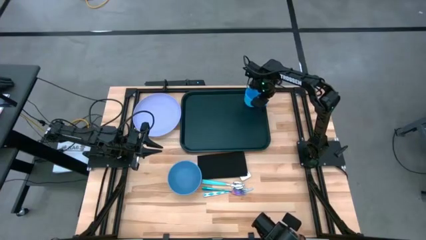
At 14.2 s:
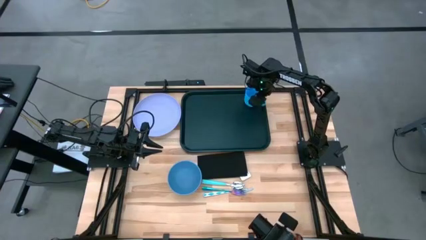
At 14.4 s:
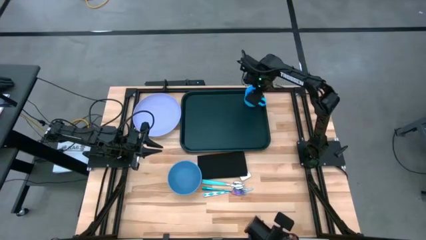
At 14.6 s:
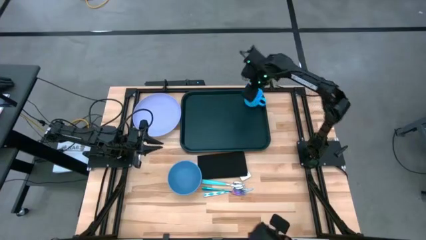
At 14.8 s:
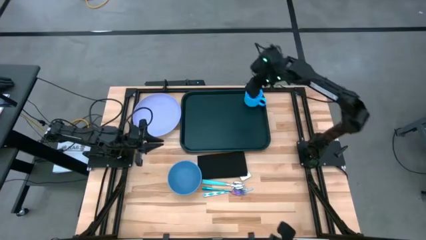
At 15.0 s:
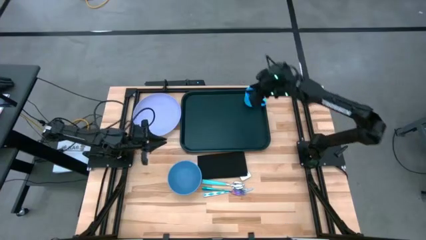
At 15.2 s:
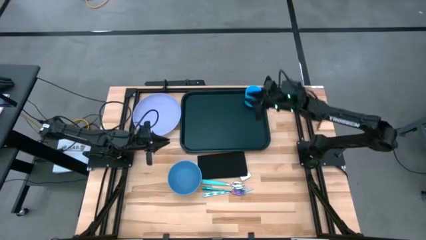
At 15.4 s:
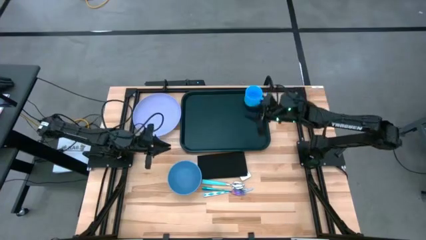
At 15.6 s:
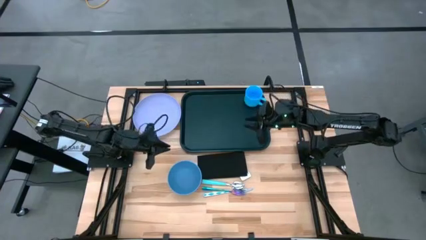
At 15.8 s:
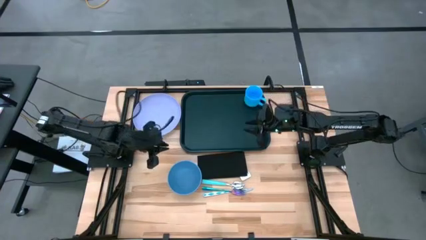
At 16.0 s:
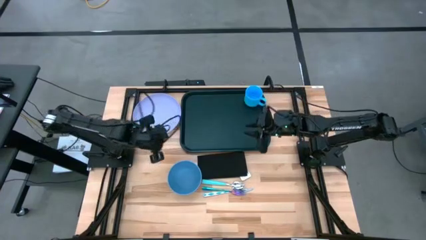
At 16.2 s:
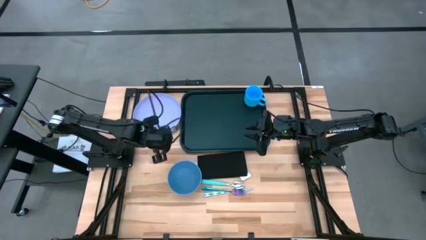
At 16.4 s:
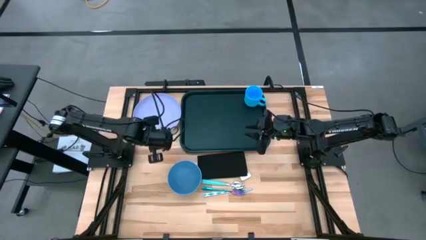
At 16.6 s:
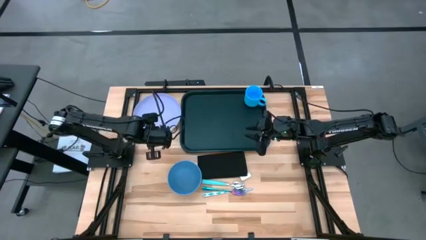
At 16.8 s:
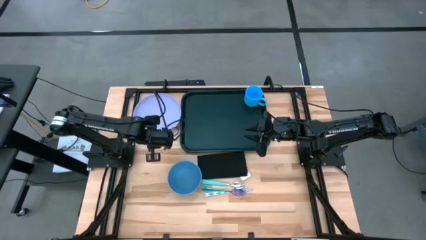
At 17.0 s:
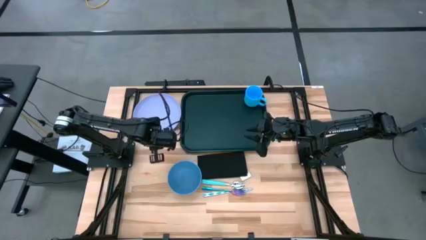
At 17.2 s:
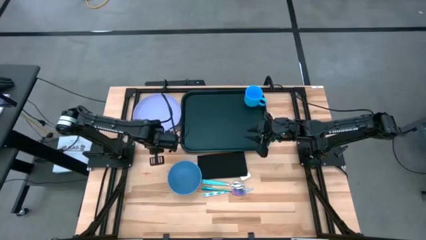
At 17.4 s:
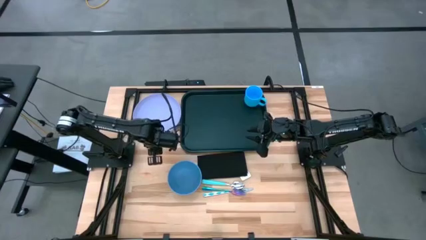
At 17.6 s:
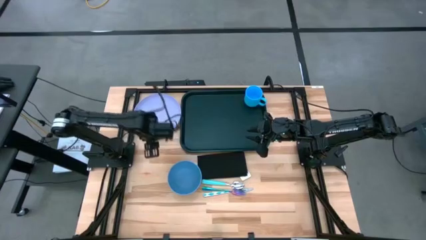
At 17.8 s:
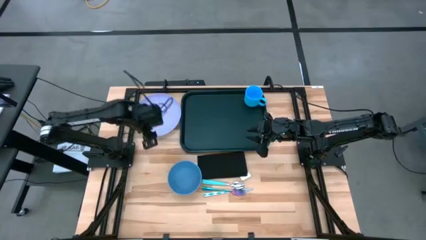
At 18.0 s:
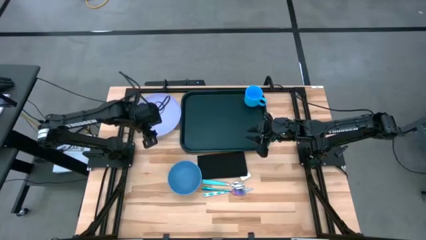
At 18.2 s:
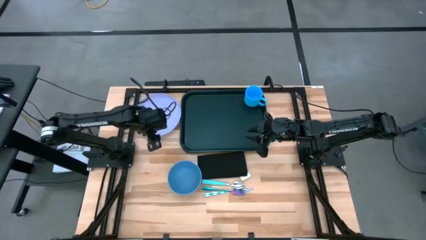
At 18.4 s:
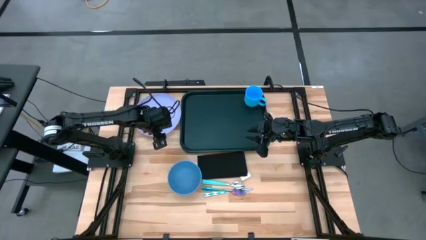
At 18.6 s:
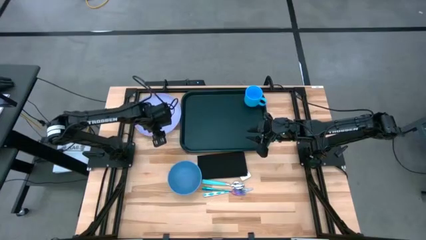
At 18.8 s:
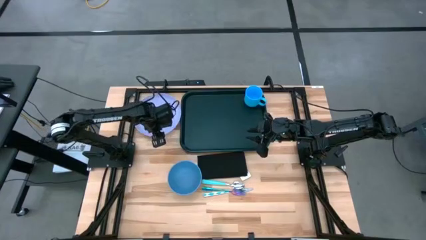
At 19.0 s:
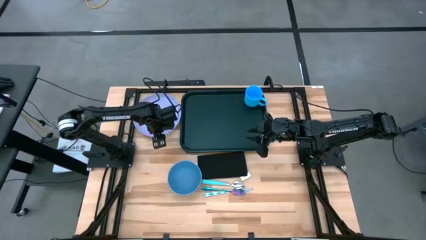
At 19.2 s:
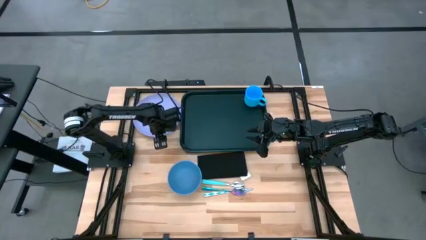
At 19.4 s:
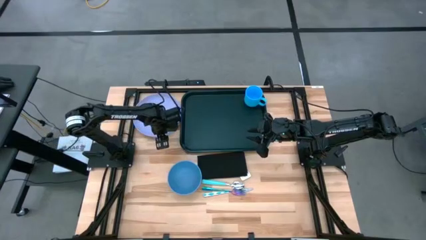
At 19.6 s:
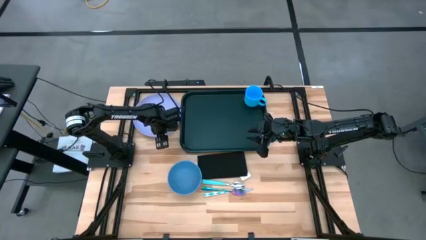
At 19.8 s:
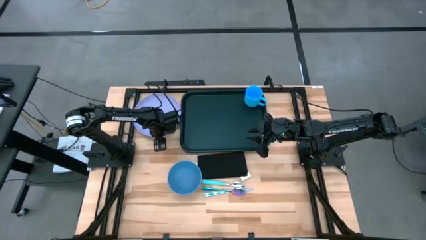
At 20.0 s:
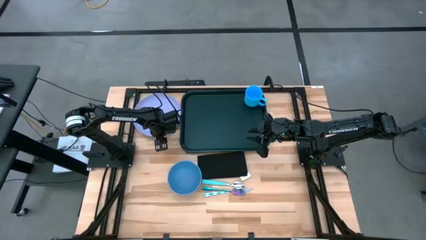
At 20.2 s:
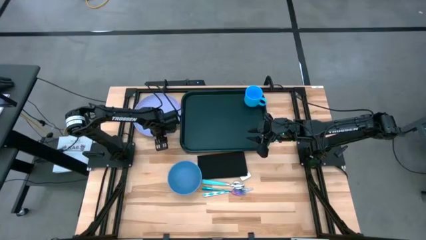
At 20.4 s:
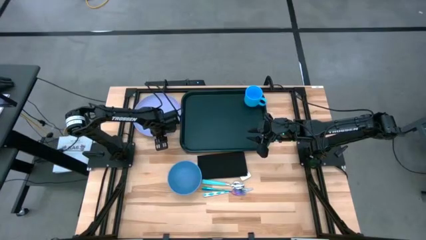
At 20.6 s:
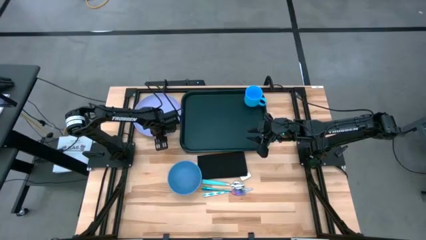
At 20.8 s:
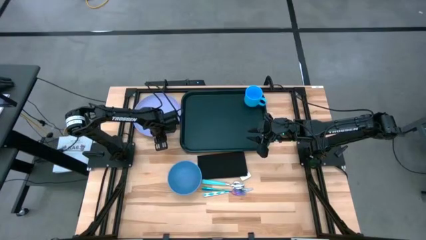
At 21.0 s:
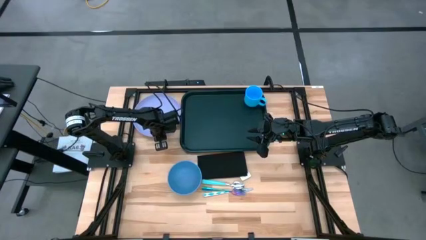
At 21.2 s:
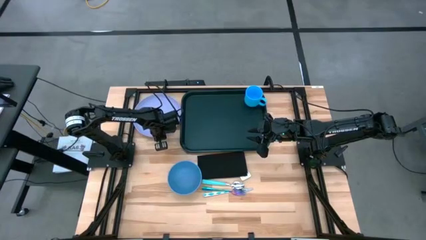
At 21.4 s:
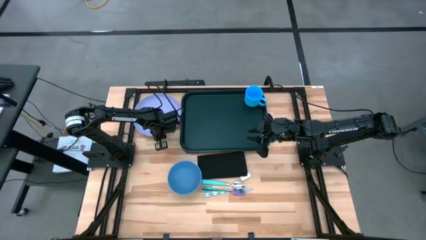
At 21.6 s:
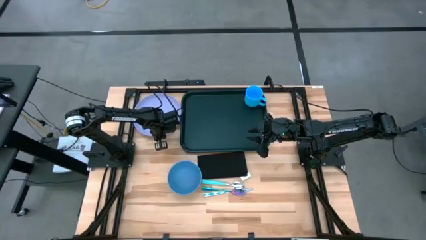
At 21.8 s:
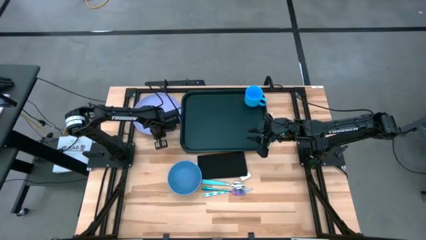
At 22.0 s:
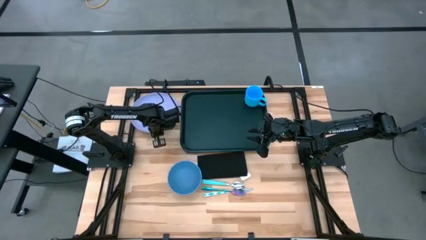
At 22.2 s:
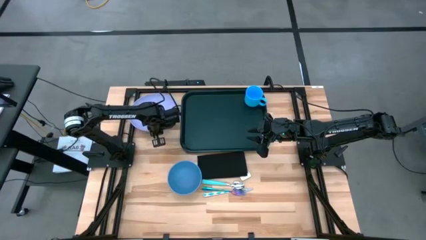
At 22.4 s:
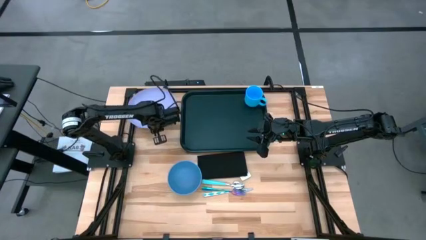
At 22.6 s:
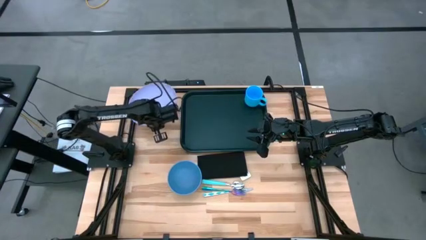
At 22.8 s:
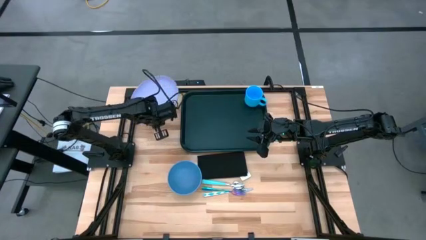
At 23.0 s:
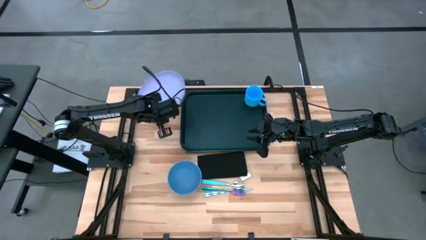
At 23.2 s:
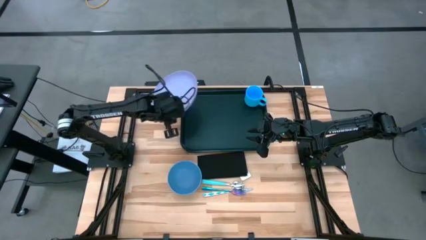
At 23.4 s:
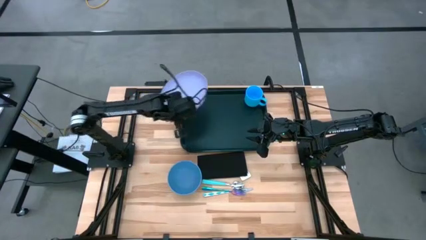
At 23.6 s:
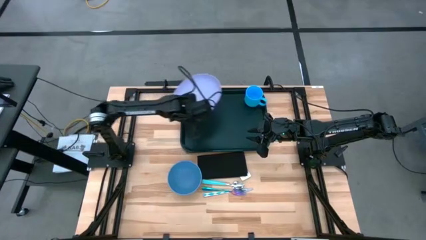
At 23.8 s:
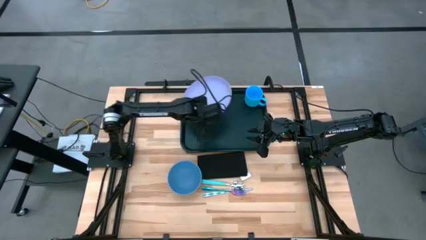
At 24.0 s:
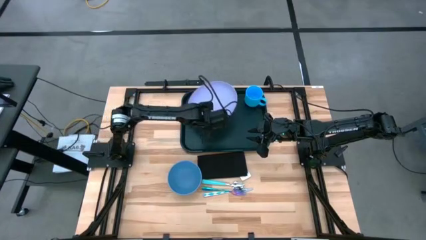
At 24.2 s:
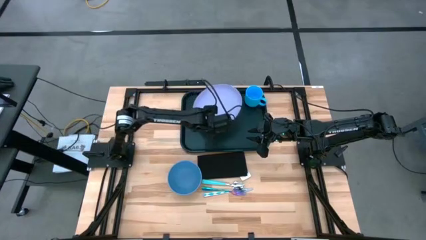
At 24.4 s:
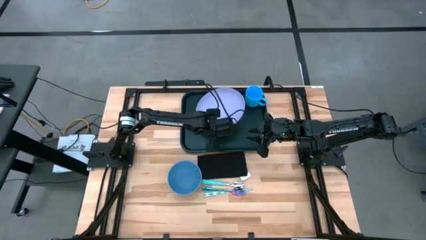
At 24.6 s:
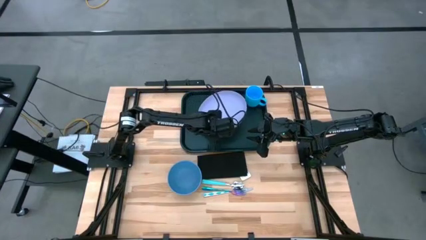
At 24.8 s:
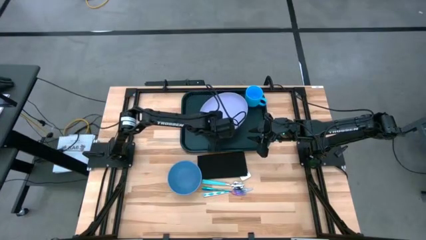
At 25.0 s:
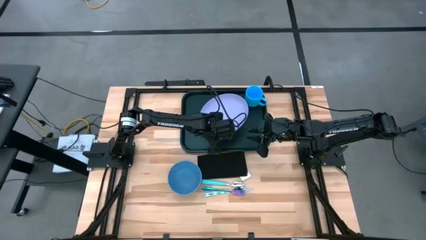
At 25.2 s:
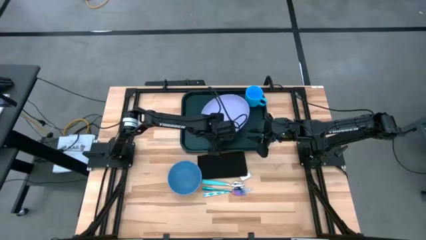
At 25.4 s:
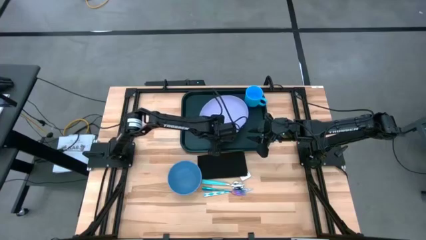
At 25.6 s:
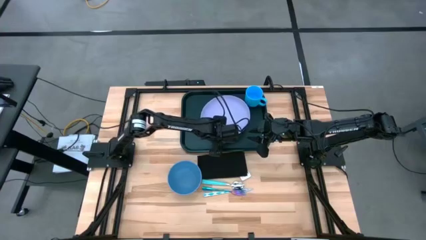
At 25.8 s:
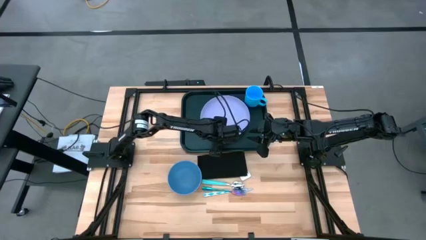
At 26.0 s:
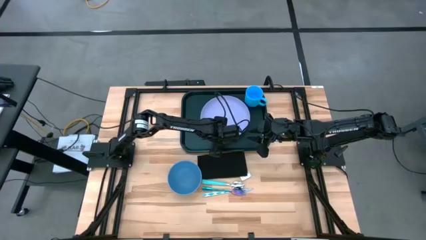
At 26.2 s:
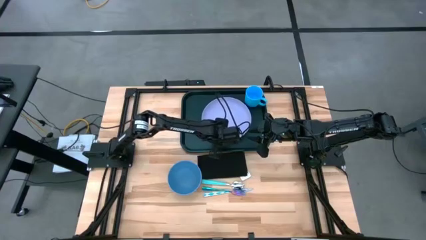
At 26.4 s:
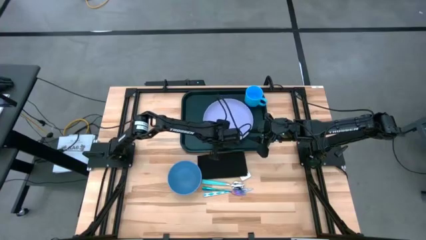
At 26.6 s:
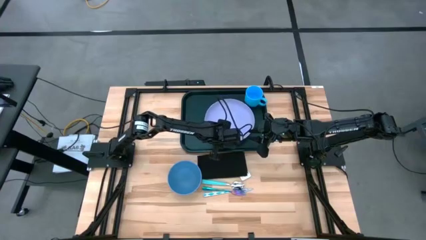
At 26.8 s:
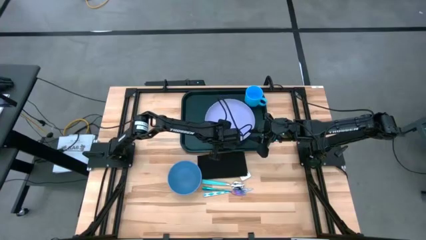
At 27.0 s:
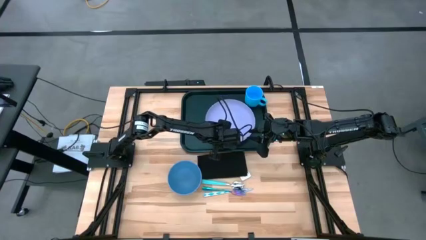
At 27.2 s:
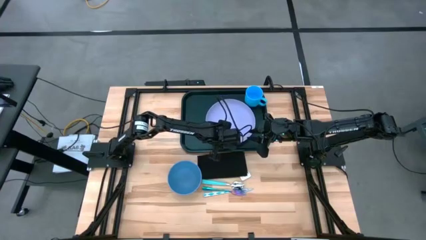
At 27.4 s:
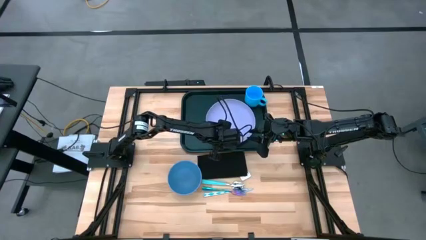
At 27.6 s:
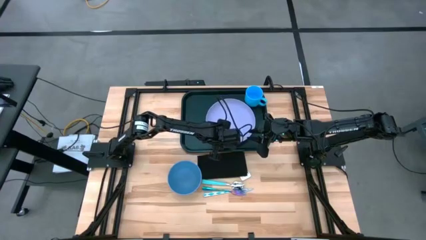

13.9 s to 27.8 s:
Task: Set up tray
Put the violet plate under the blue mug on the black tray

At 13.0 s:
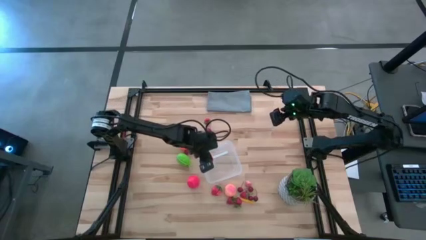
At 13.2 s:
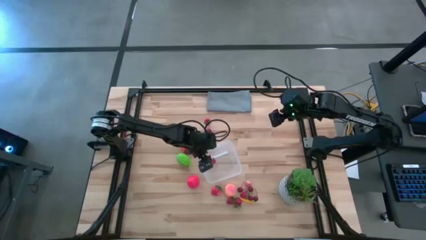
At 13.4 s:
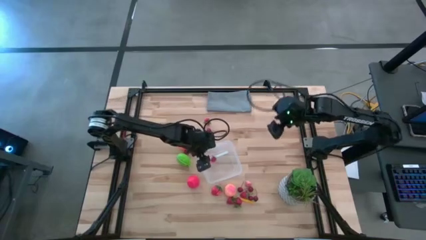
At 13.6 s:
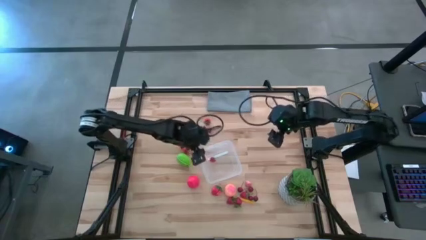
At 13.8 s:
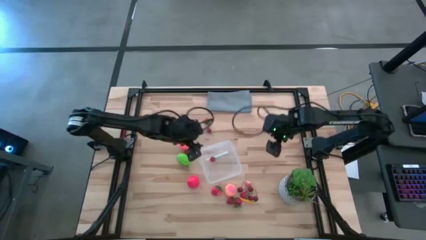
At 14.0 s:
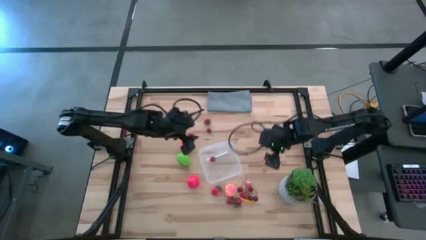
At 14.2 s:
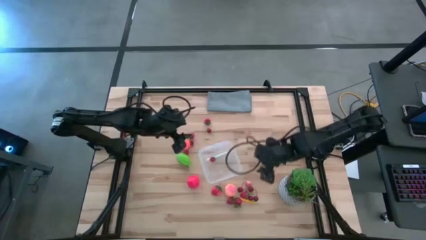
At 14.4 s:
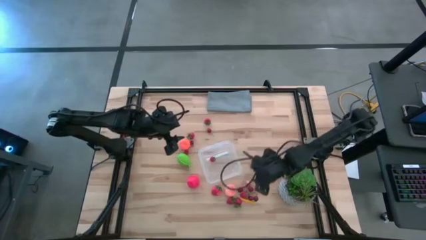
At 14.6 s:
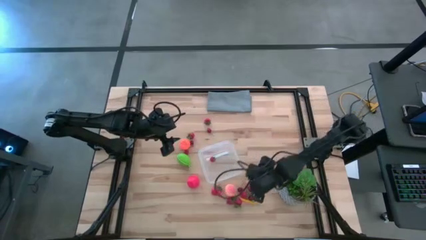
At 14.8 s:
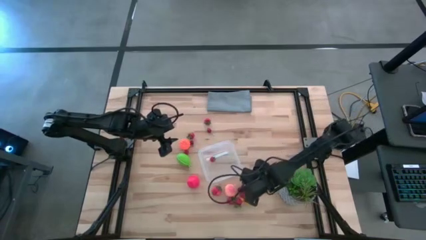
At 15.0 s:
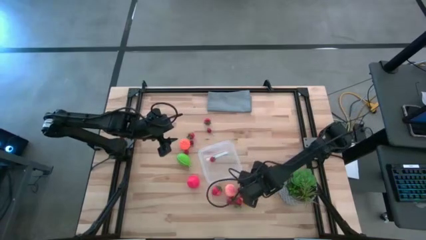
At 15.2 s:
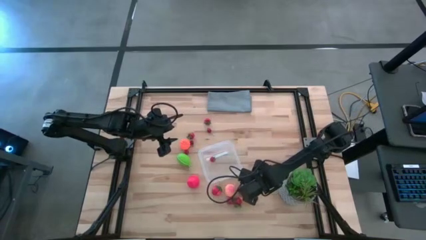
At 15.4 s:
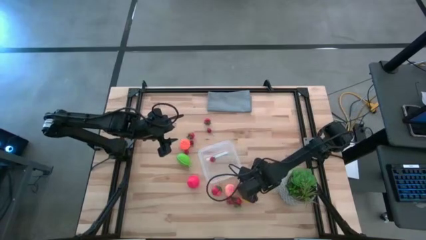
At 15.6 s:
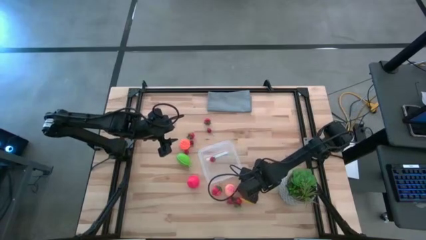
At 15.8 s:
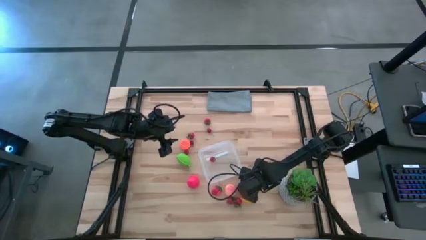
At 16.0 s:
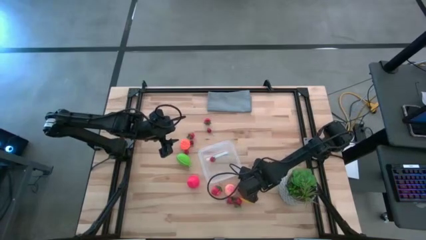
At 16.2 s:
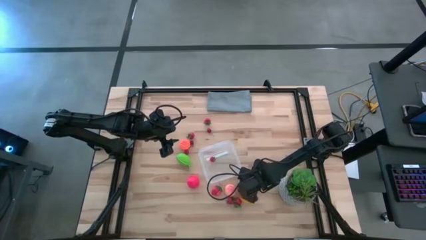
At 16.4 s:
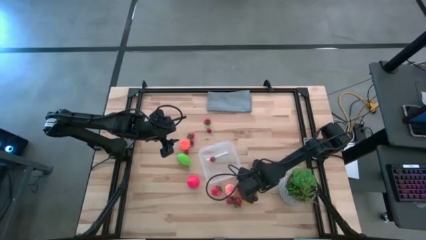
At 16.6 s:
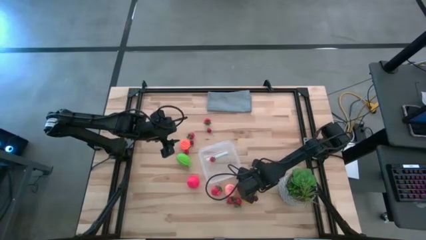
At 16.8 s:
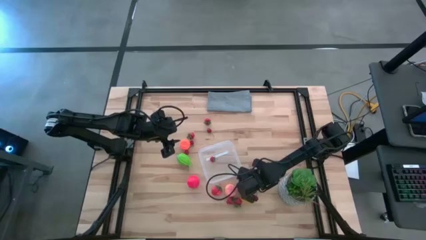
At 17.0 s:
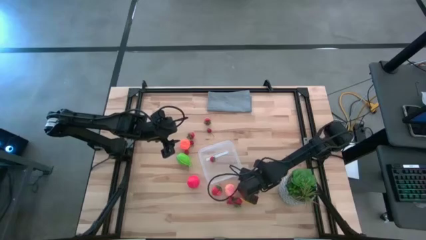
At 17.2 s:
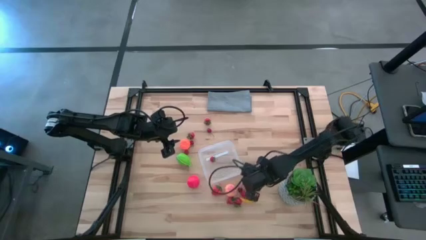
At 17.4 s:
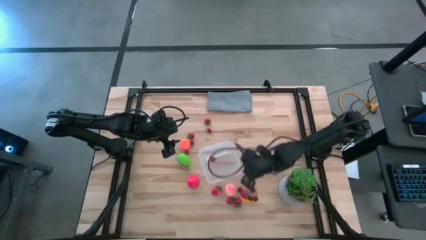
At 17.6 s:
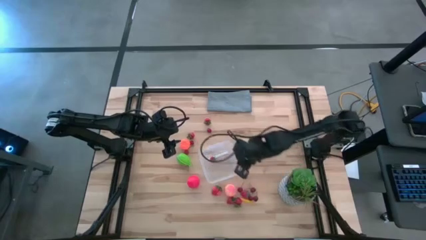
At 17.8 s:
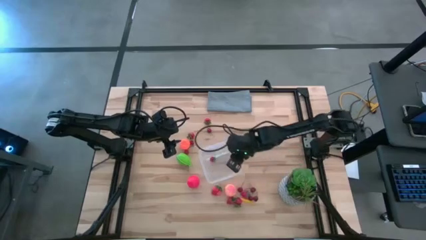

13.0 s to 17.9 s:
Task: Pick and placing Produce into tupperware
Put the right pink apricot into the transparent container
